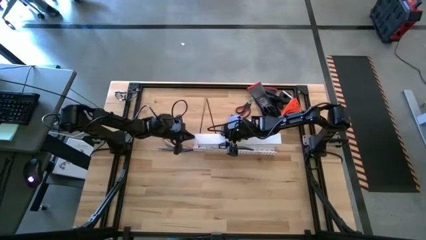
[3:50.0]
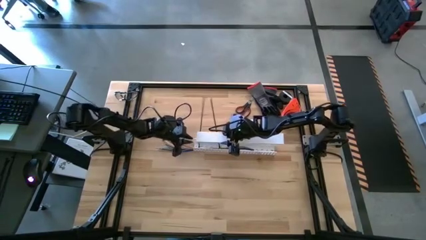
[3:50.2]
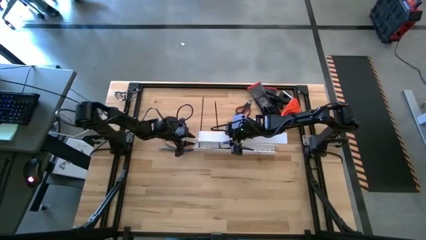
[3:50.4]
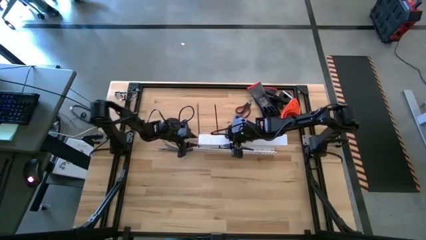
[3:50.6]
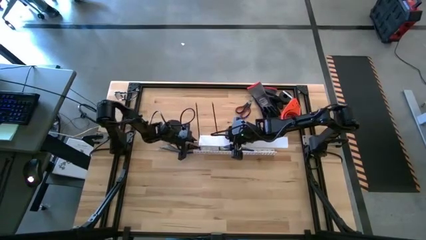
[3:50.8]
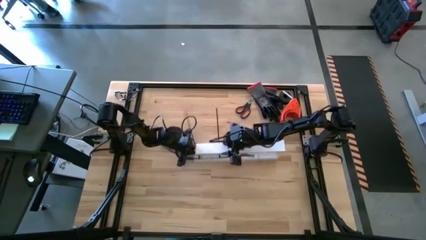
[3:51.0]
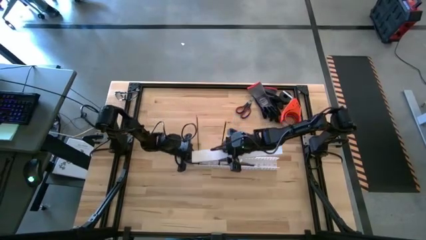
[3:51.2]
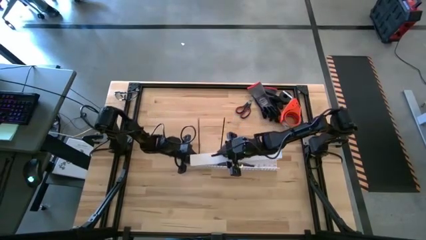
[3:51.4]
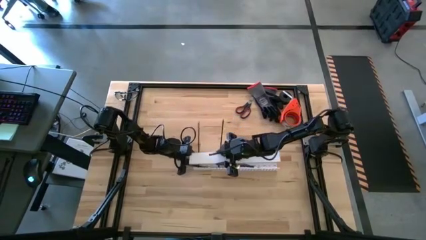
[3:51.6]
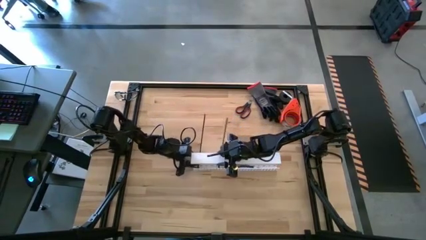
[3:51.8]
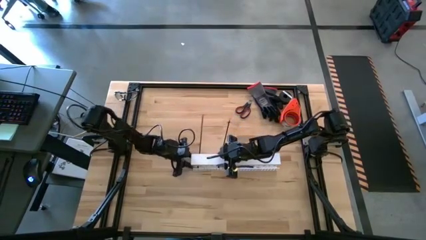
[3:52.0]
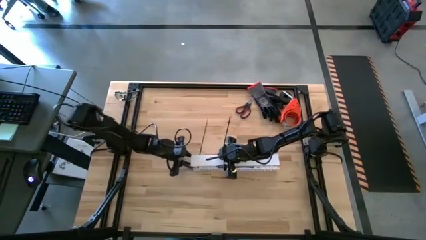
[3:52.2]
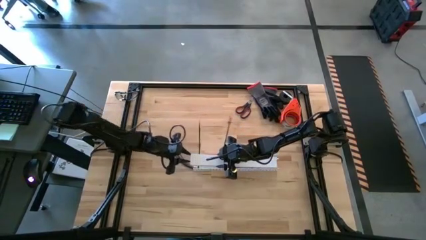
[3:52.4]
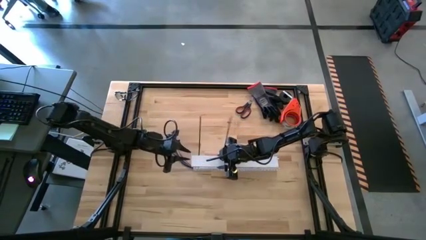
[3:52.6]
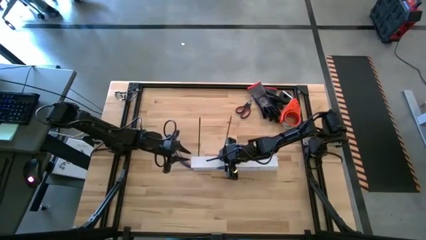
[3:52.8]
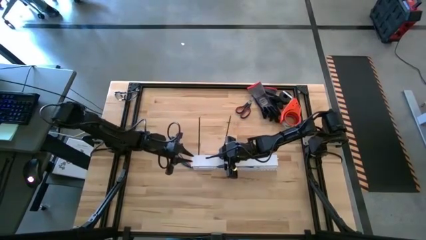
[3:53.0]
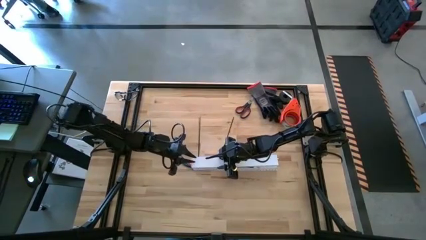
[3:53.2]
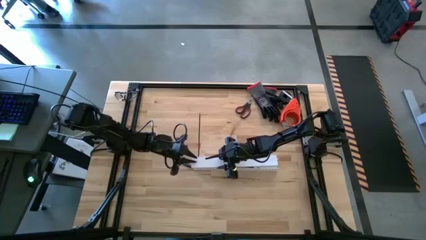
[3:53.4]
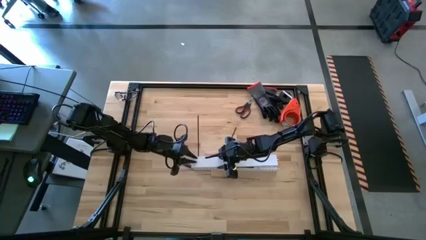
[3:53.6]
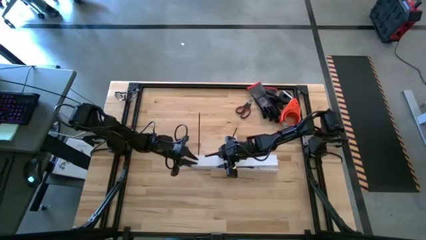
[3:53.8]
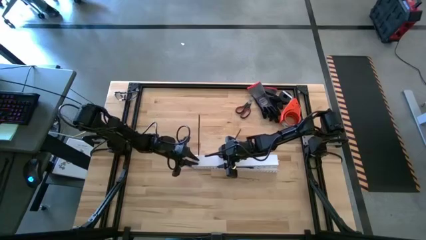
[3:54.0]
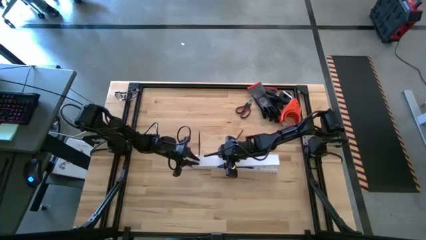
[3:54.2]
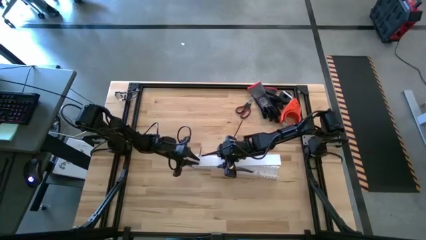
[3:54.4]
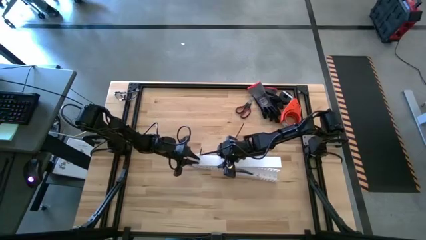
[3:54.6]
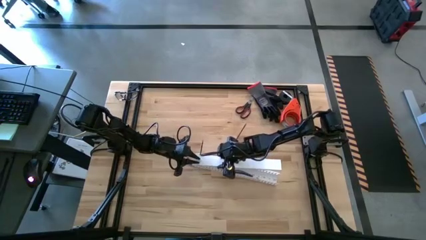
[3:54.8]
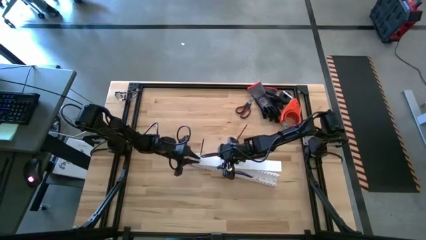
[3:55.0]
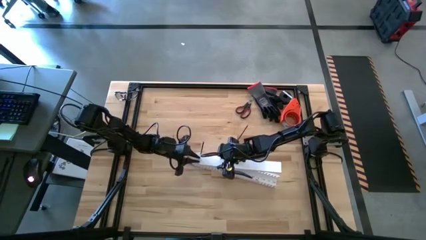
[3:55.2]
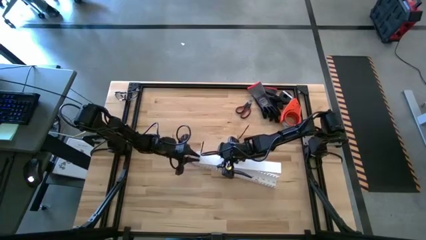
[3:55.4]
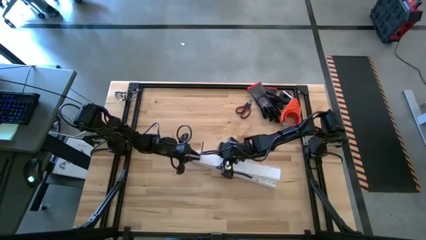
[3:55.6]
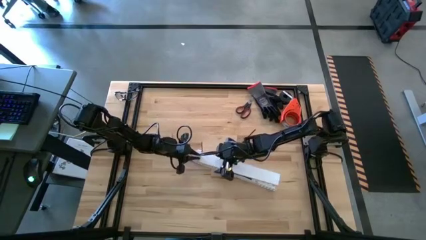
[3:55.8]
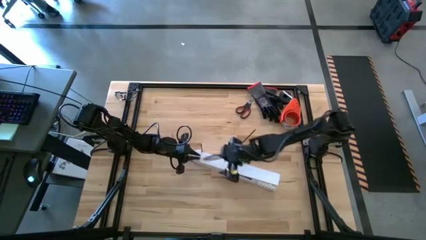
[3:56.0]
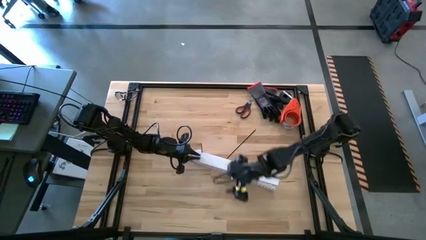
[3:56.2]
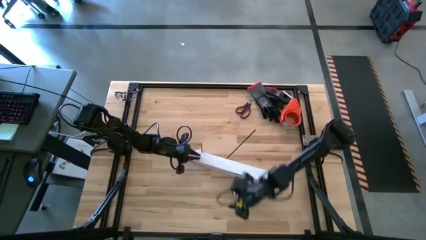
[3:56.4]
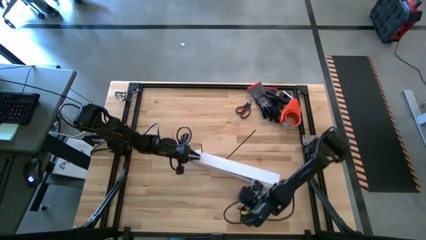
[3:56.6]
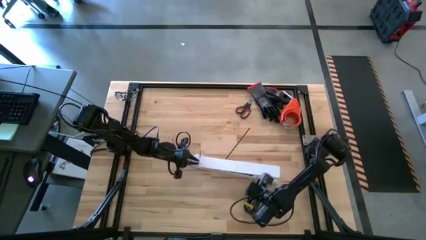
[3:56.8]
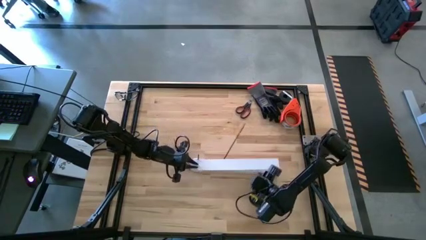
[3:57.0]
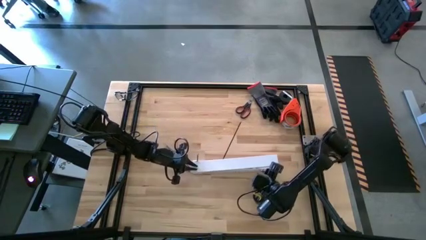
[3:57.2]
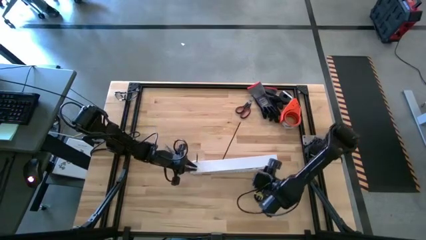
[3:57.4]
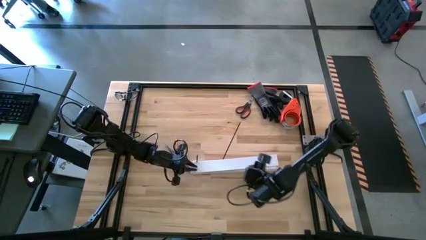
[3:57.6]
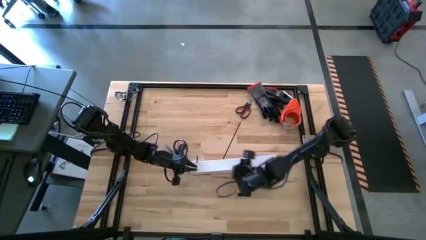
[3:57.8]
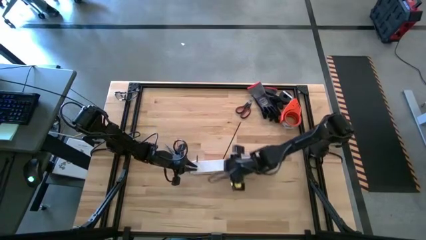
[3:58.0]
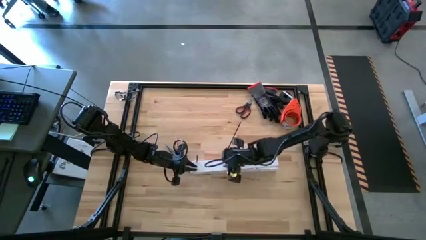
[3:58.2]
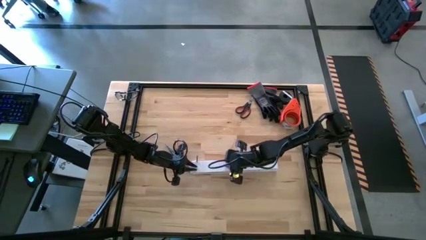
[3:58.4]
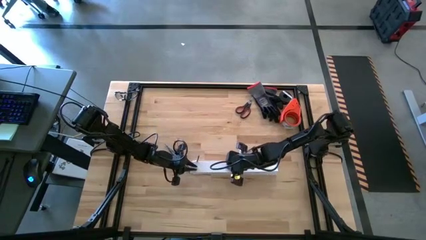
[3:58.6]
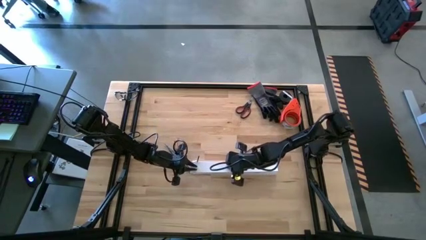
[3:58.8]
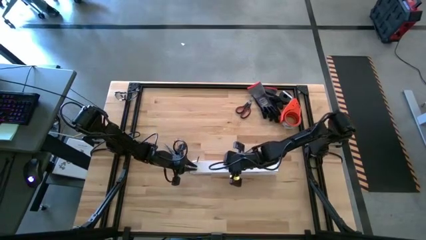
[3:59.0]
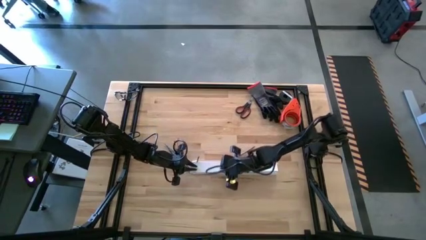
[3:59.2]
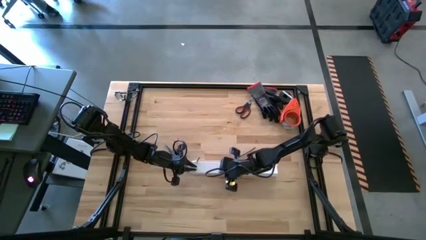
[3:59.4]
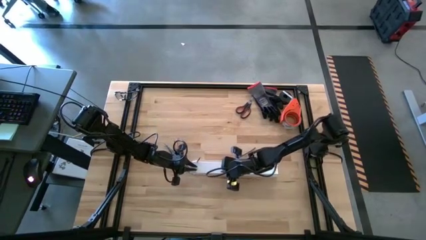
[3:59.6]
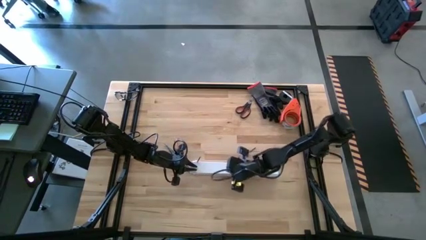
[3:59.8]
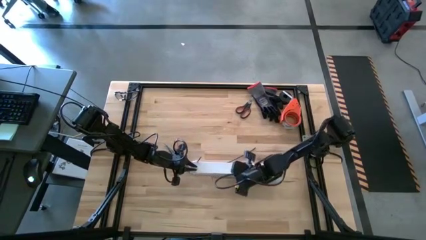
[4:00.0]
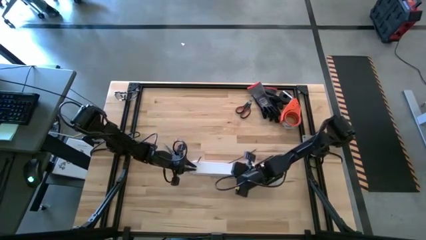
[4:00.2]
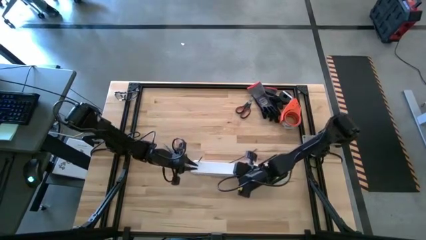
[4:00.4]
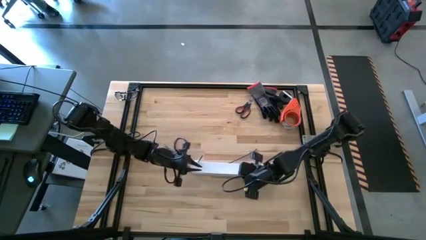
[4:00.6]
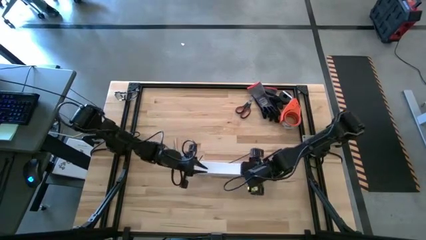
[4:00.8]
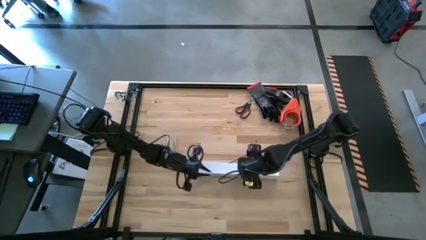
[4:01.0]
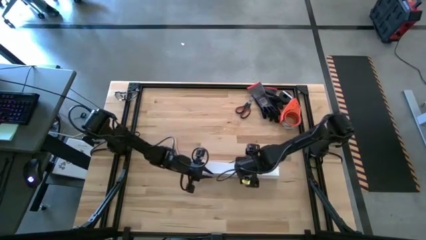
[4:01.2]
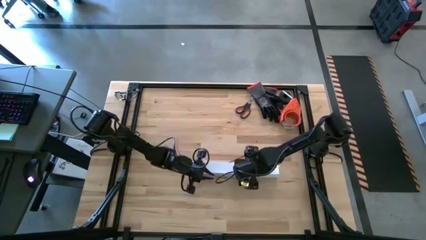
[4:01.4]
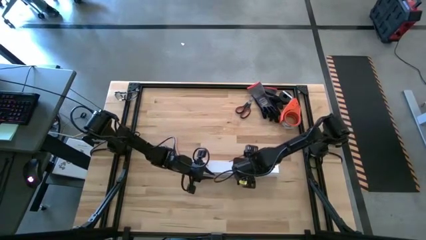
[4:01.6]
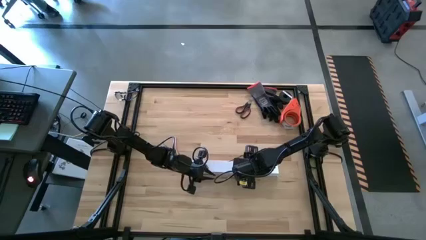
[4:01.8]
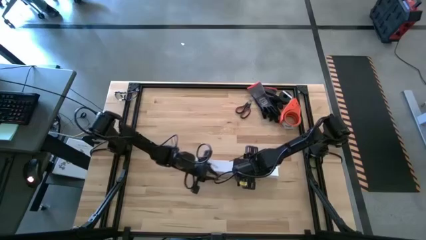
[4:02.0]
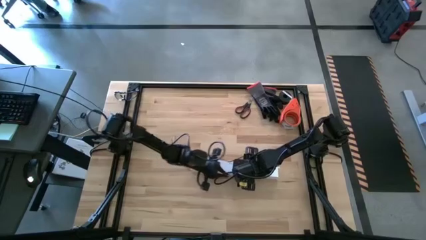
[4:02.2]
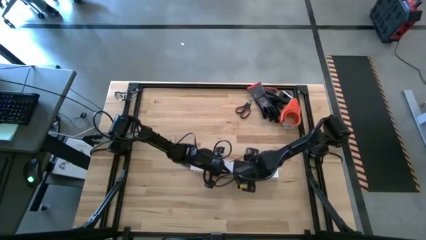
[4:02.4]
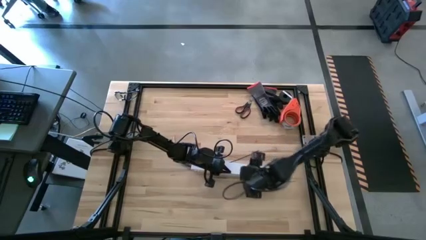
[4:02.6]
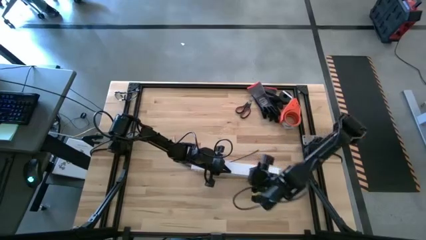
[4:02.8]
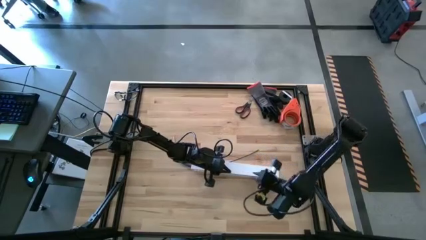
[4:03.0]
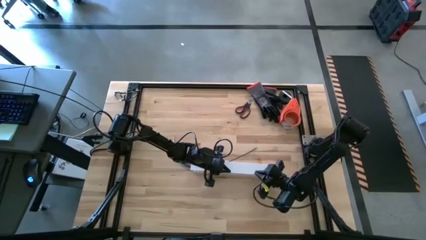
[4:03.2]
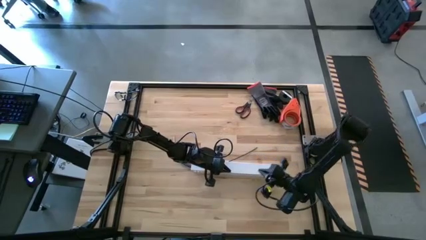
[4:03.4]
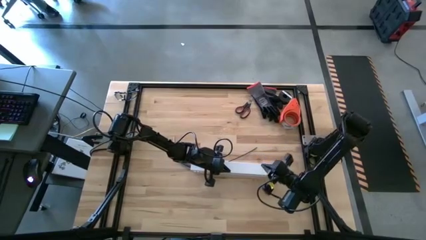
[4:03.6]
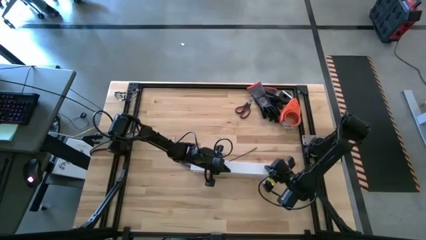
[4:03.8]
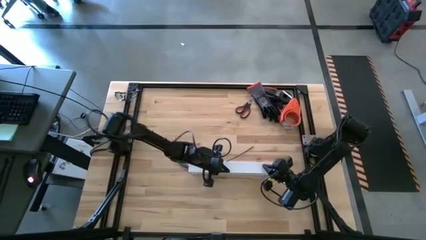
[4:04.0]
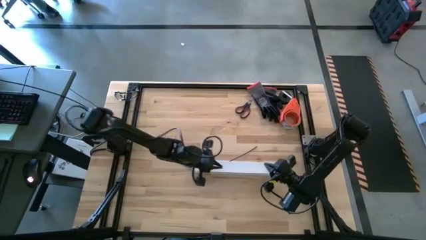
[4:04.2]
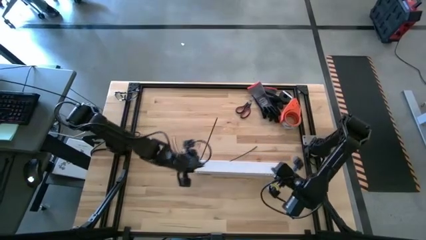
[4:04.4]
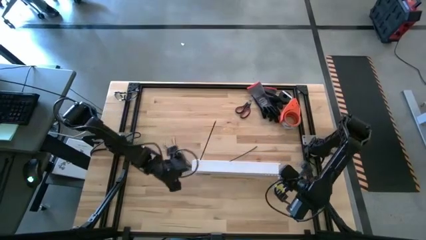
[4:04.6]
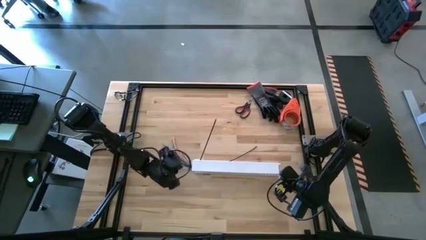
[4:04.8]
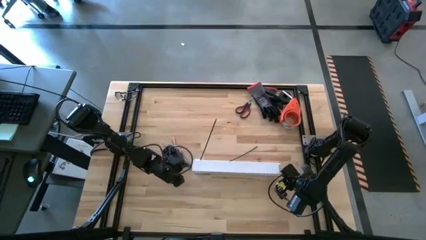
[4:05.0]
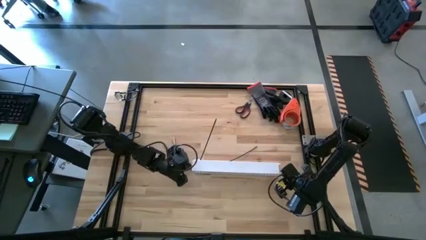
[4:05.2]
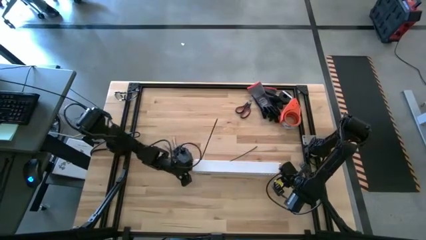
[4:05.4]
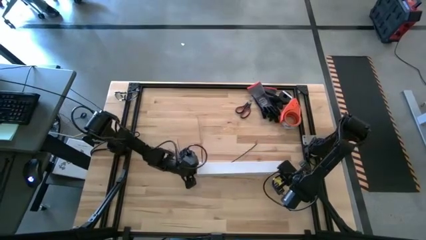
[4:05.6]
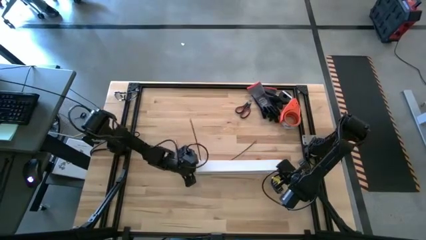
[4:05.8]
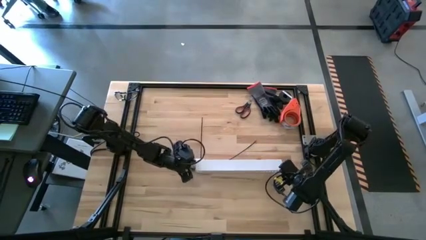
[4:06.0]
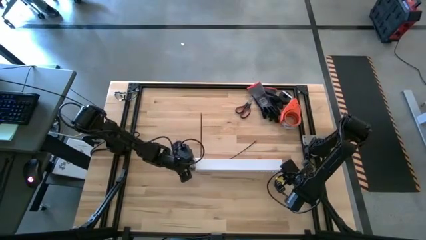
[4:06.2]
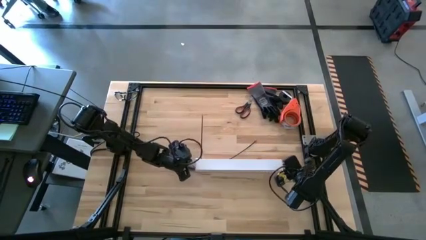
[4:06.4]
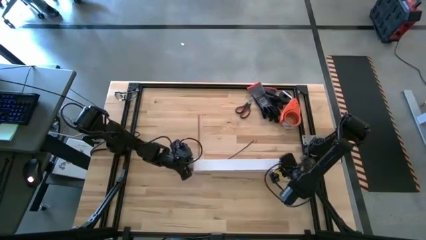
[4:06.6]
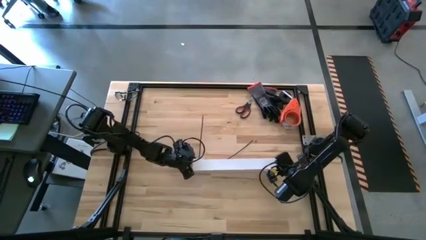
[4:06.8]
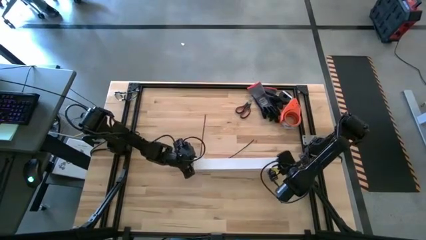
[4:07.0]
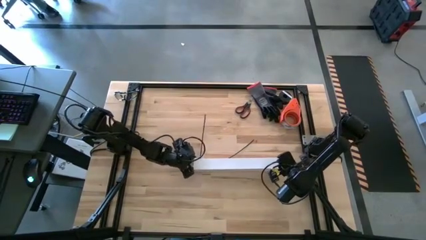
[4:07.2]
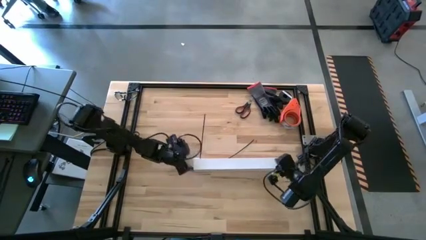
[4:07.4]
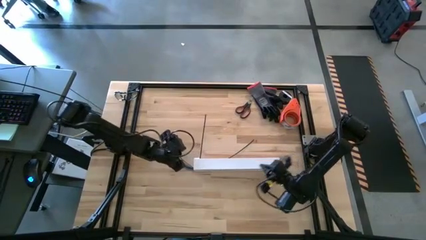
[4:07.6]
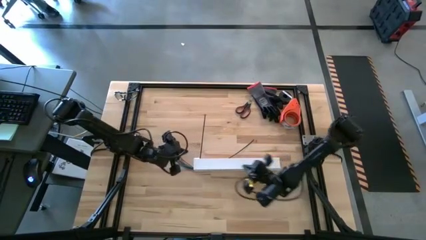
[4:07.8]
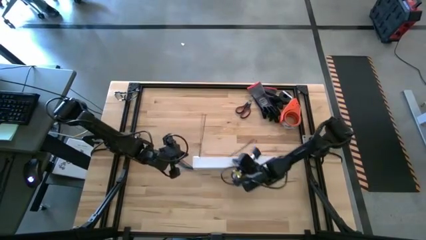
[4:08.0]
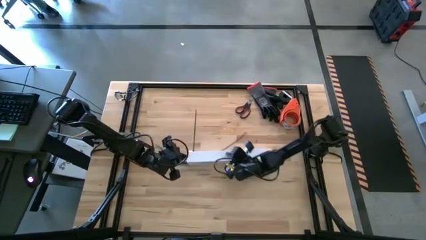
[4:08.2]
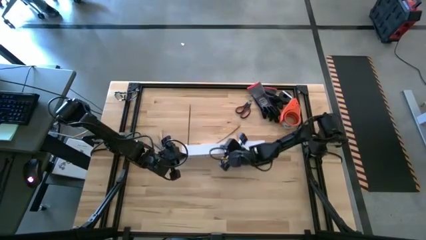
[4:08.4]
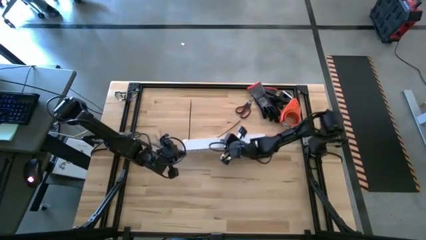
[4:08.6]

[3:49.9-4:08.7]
Task: Ziptie cables
Close the white cable duct
